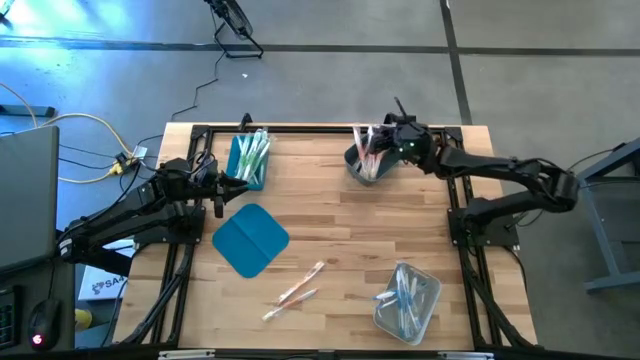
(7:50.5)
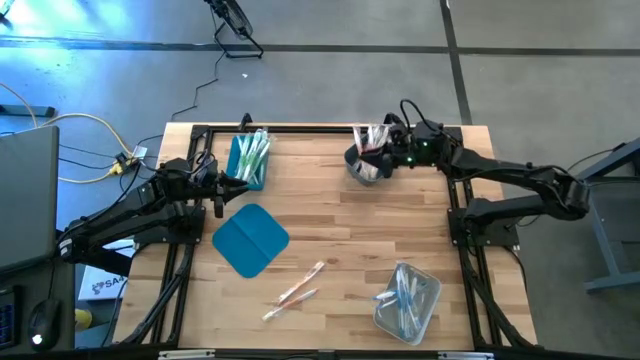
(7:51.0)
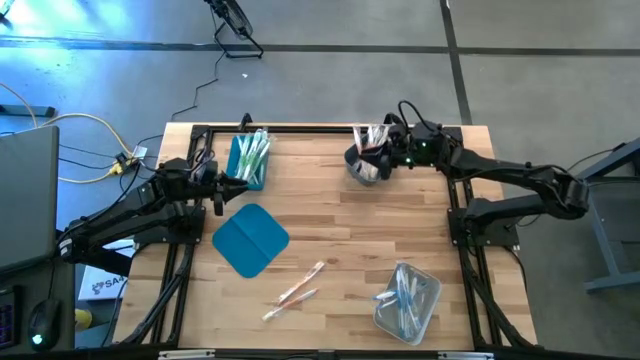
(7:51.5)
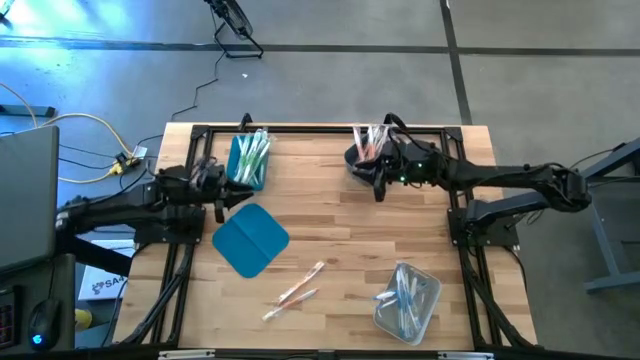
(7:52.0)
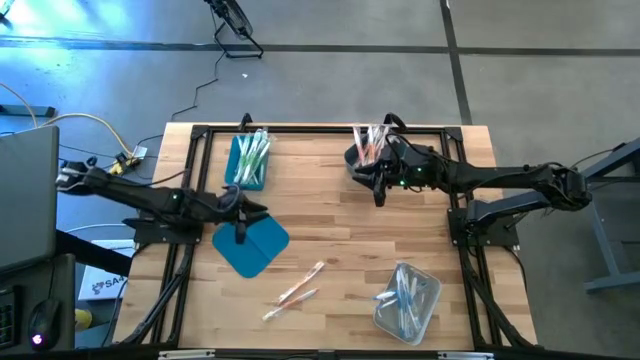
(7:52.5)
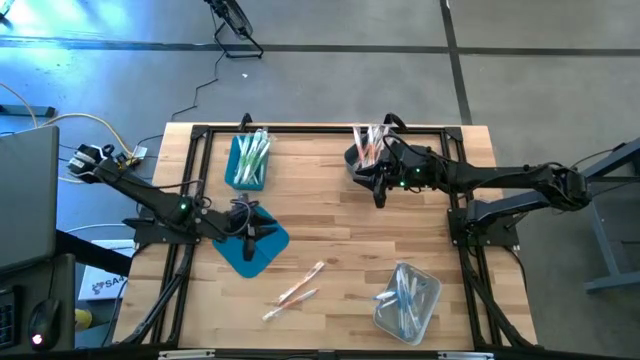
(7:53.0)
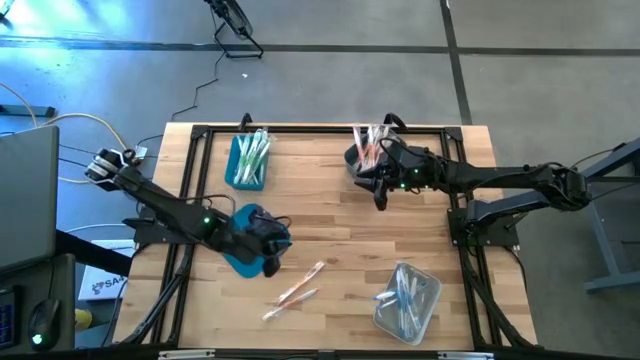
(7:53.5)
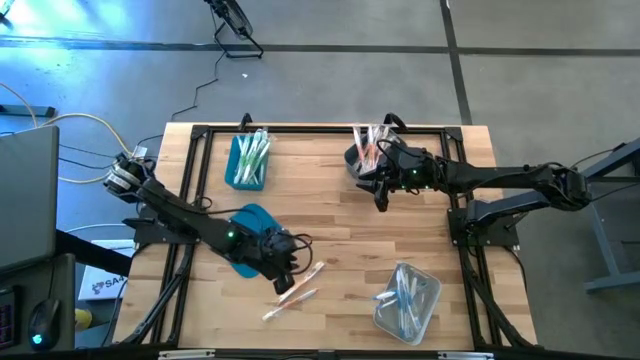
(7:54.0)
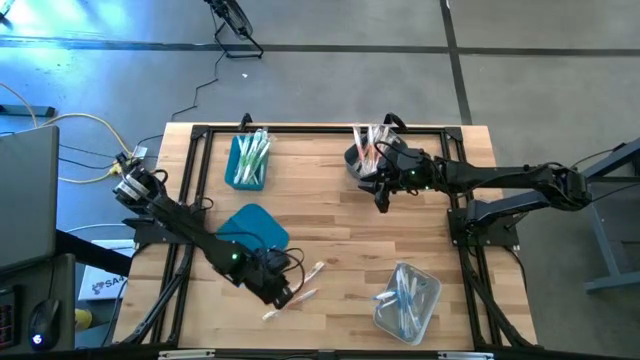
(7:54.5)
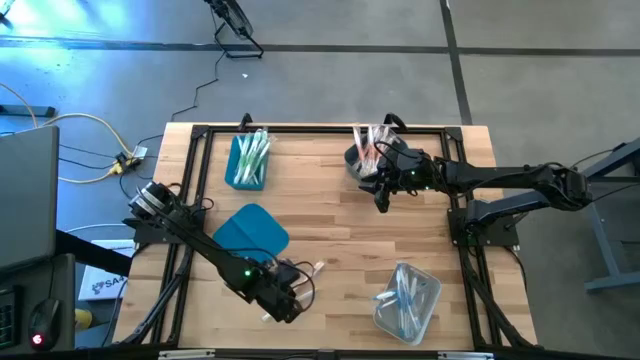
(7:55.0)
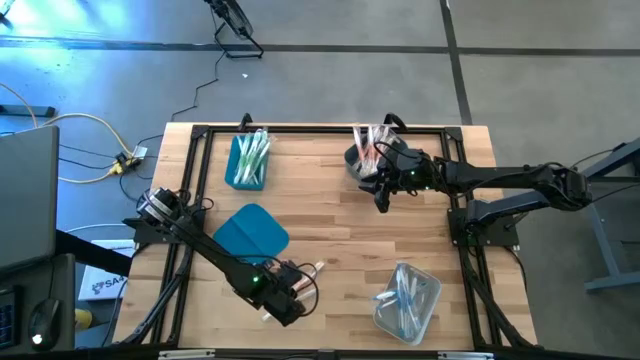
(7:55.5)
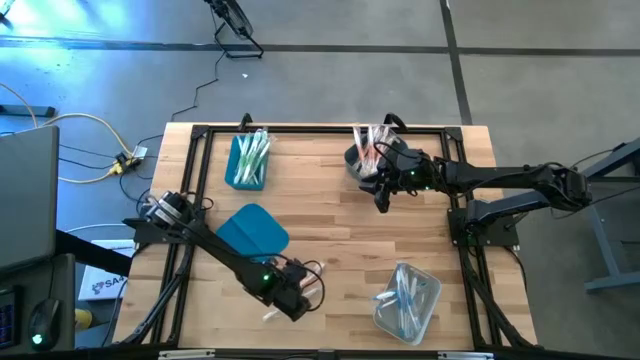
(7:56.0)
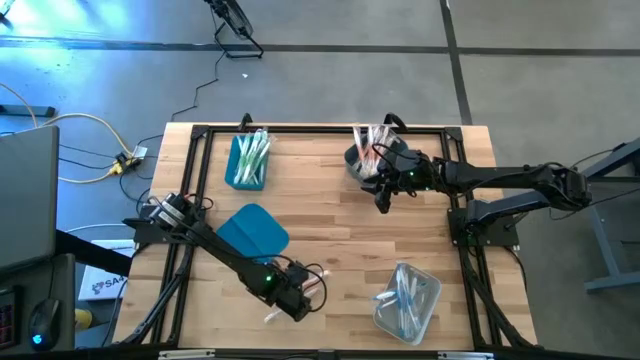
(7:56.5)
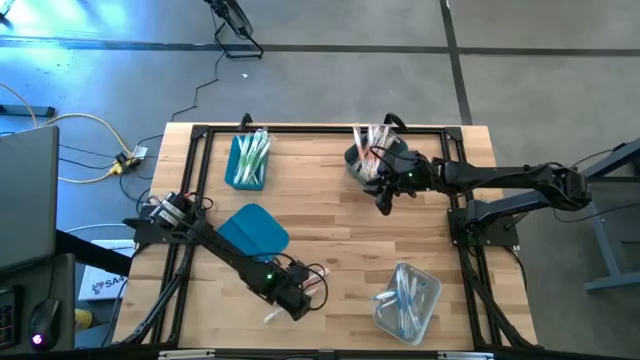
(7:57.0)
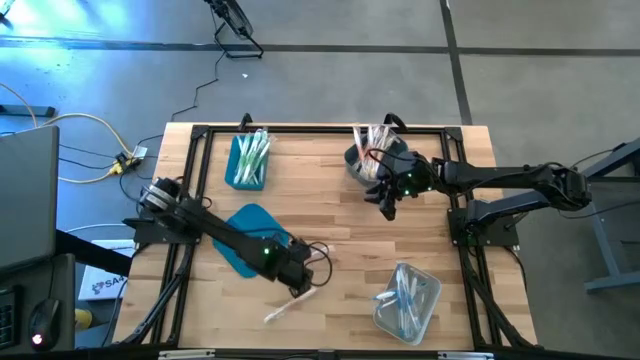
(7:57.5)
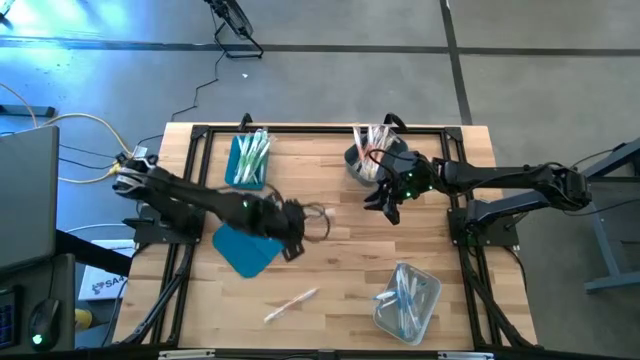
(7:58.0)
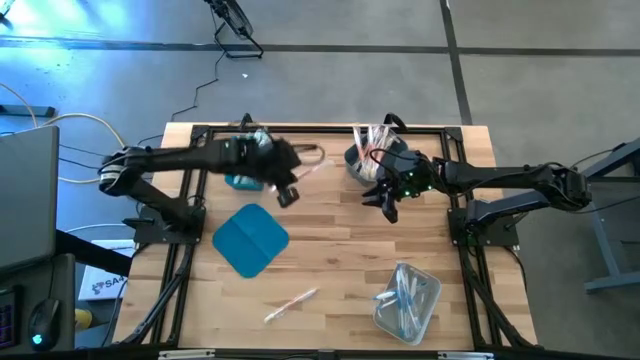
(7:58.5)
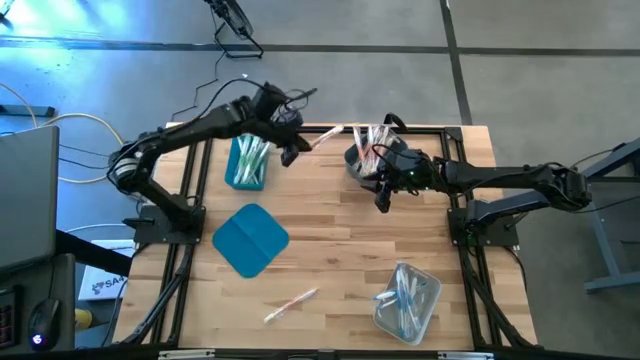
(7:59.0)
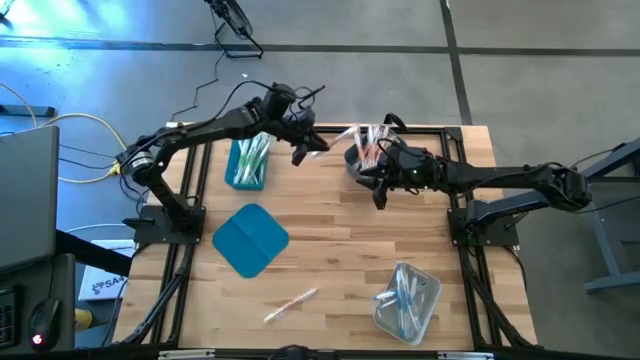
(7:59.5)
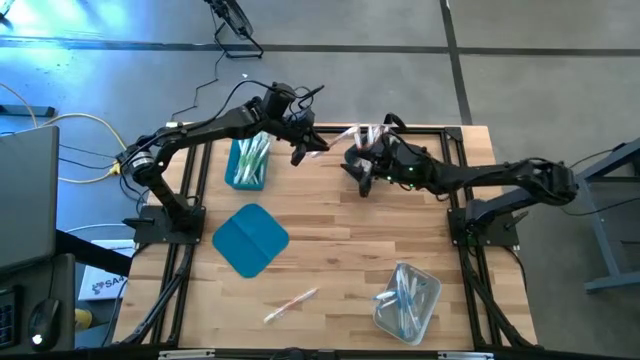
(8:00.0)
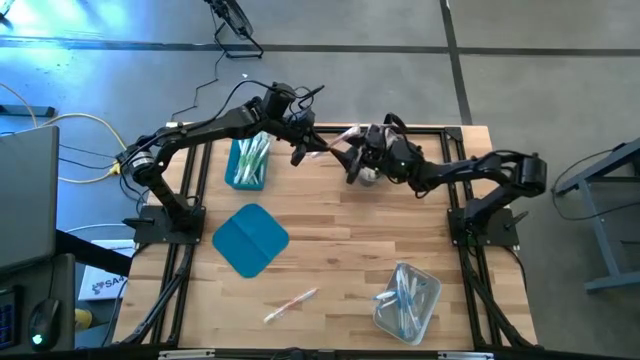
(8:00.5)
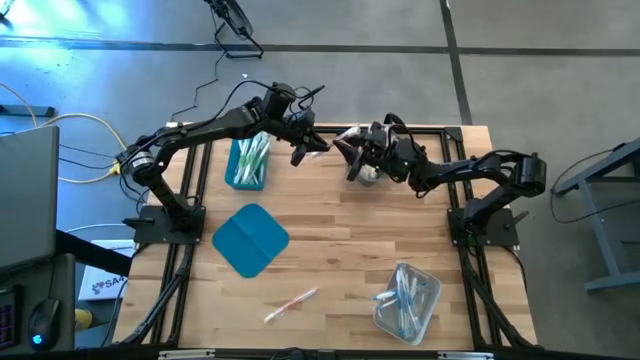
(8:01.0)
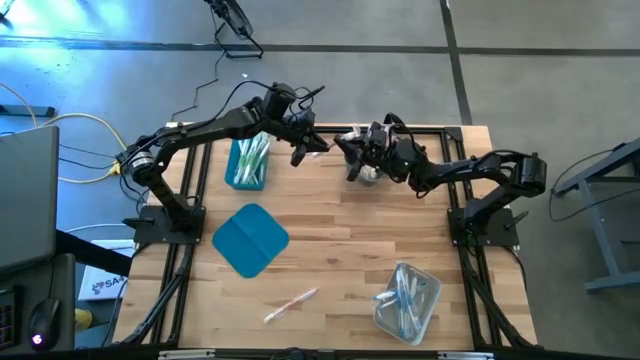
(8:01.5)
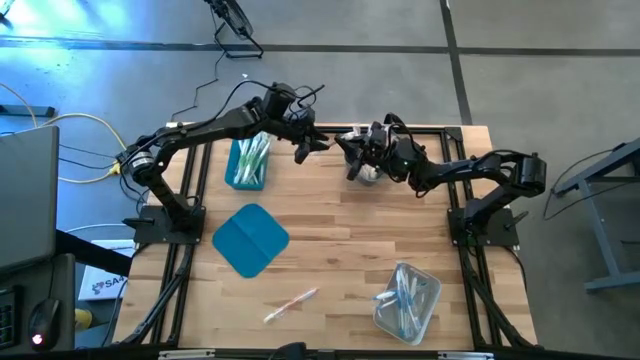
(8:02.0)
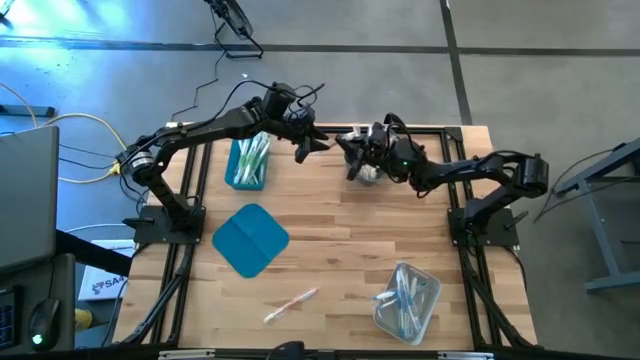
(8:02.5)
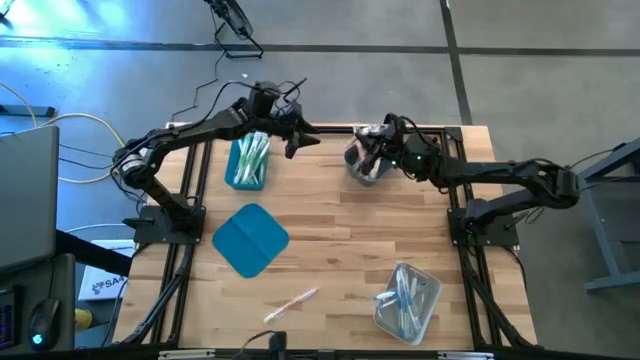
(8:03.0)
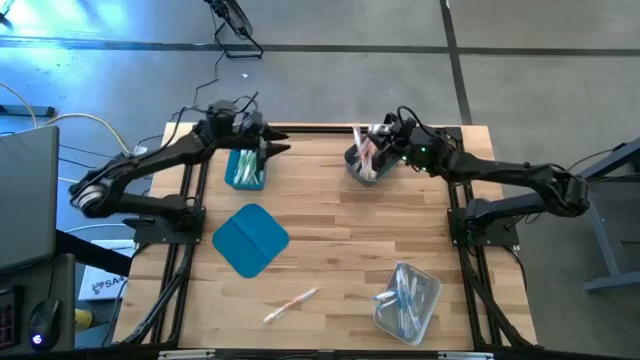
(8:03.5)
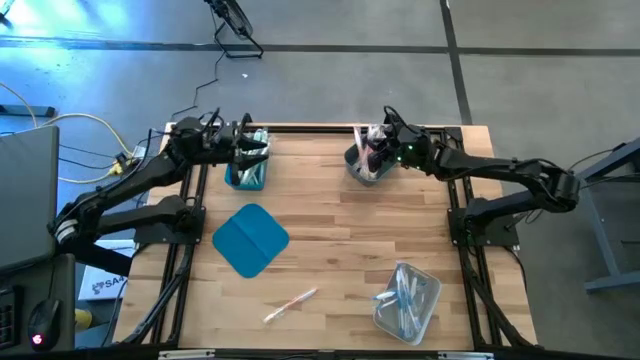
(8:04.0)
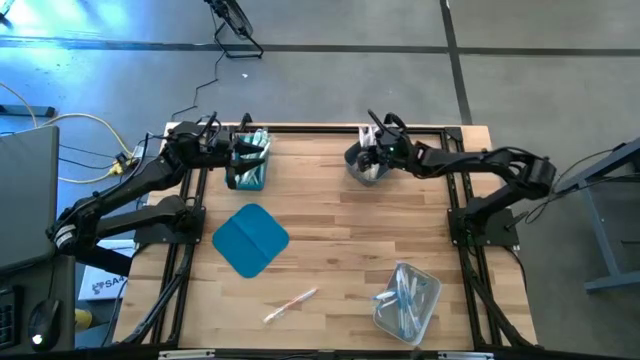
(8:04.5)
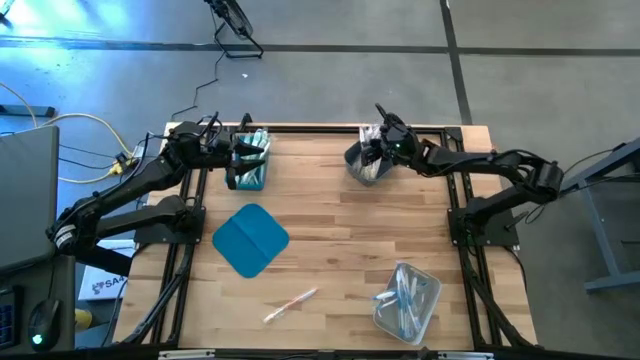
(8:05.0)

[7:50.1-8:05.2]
Task: Pick & Place Toothbrushes
Put the top orange toothbrush into the dark gray bin

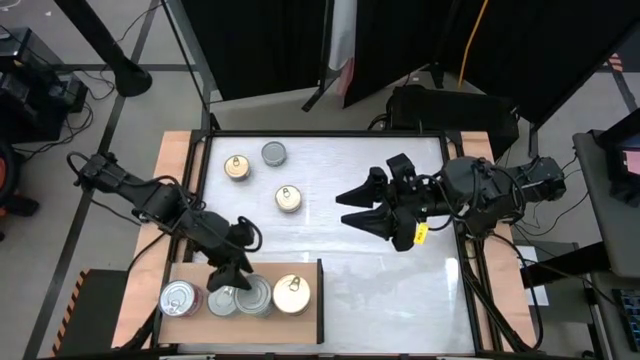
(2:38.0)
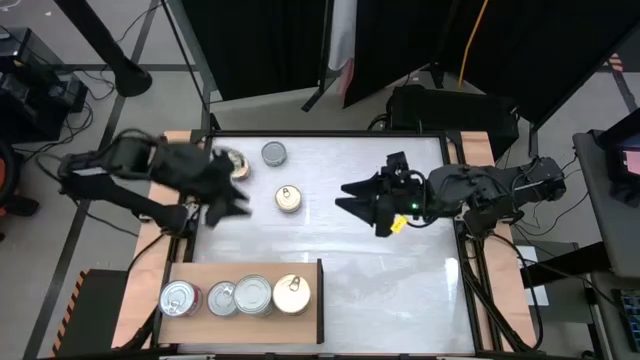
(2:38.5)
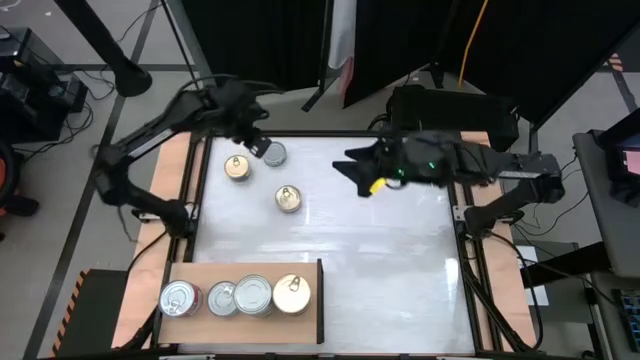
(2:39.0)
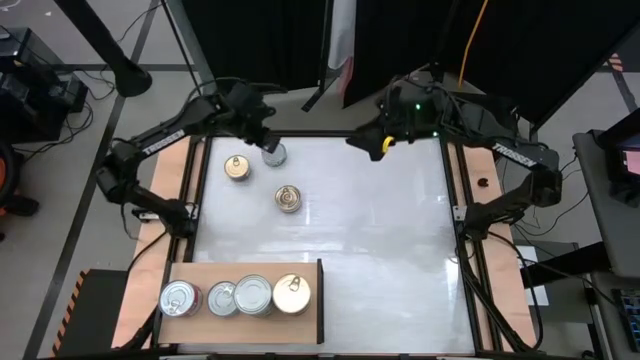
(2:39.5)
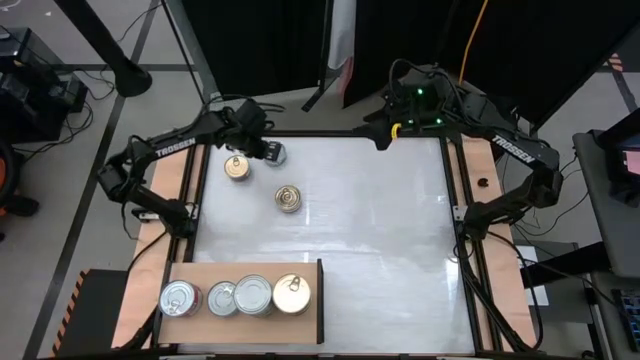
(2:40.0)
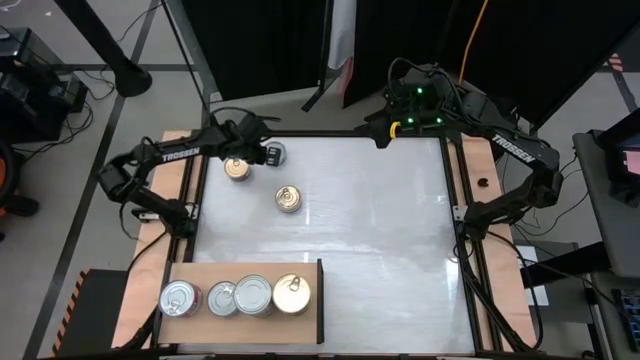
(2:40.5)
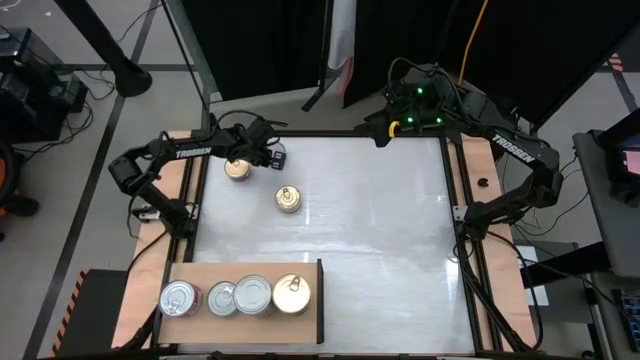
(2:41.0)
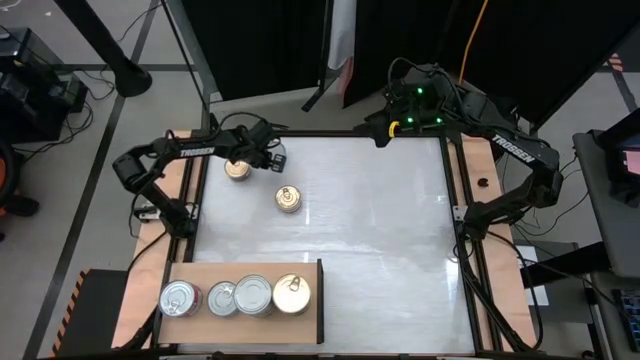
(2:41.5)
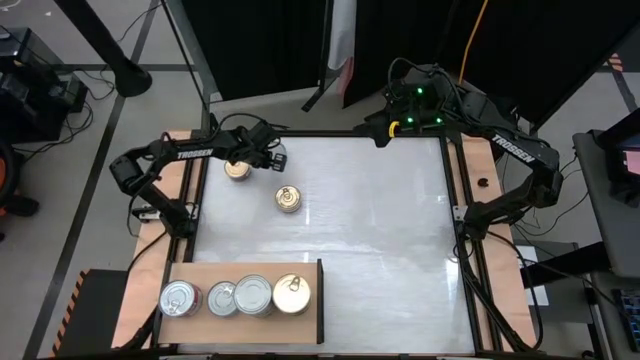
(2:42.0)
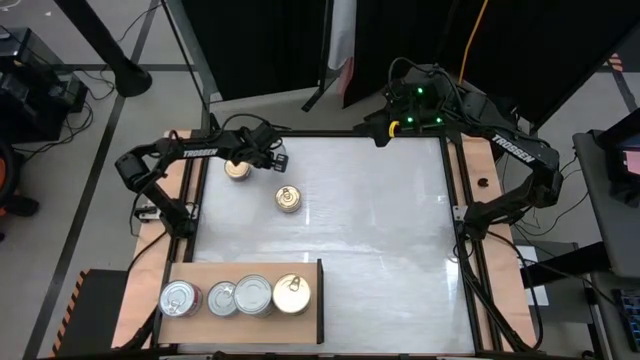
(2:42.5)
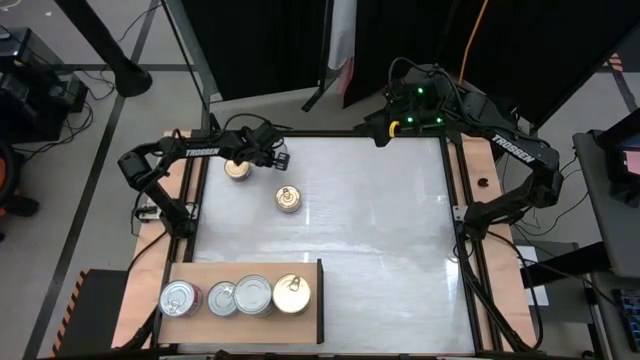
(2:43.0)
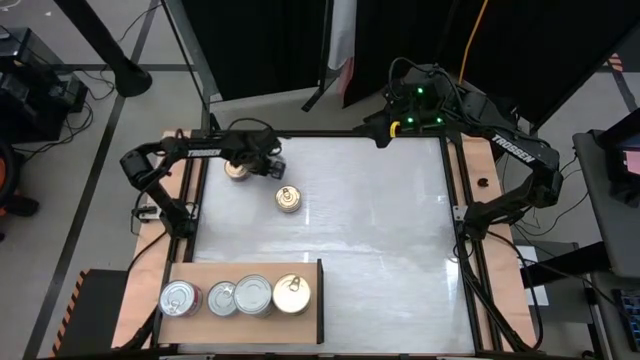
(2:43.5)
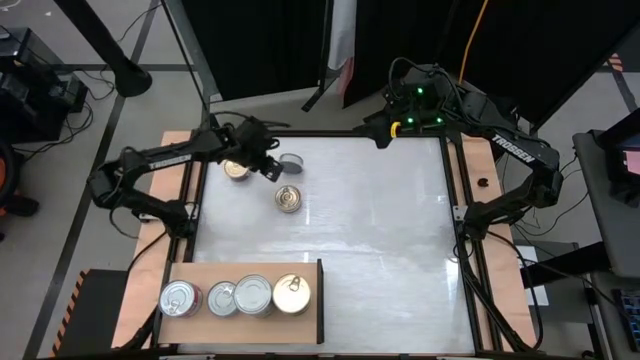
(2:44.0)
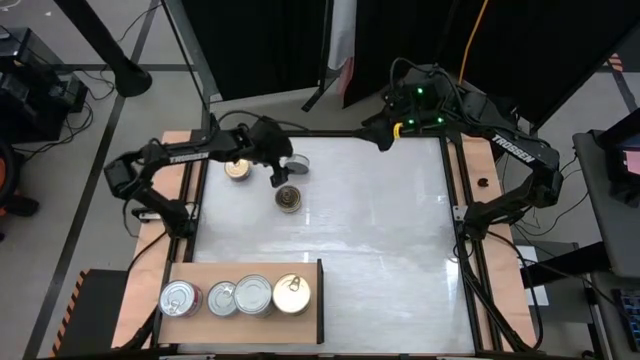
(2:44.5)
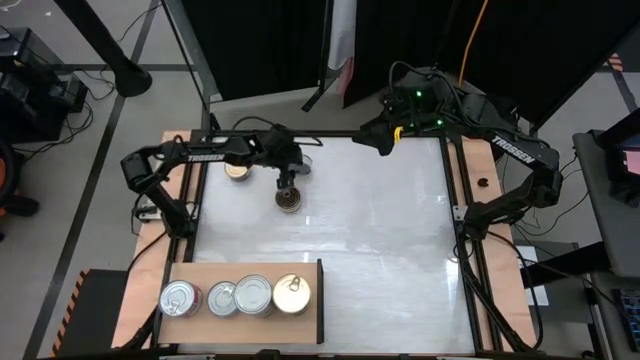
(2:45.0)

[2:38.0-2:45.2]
Task: Stack canned seafood by type on shelf
Stack the green white tuna can on top of the other green white tuna cans on the shelf
